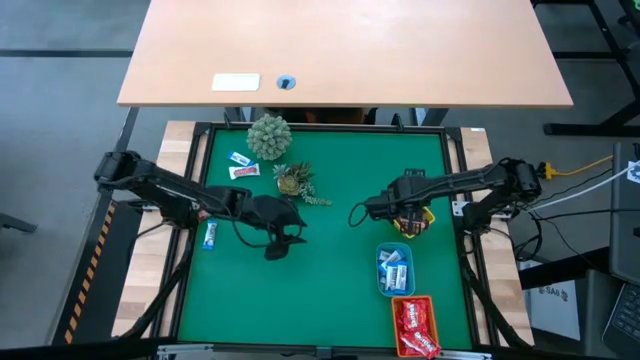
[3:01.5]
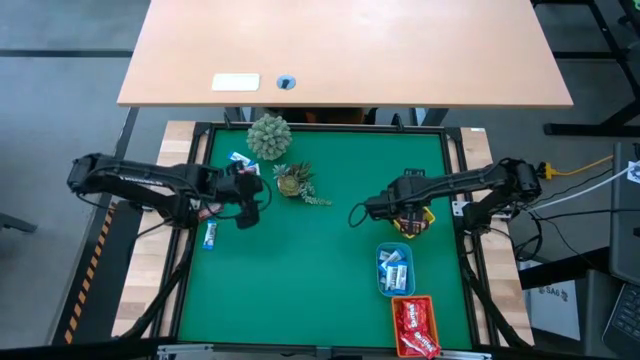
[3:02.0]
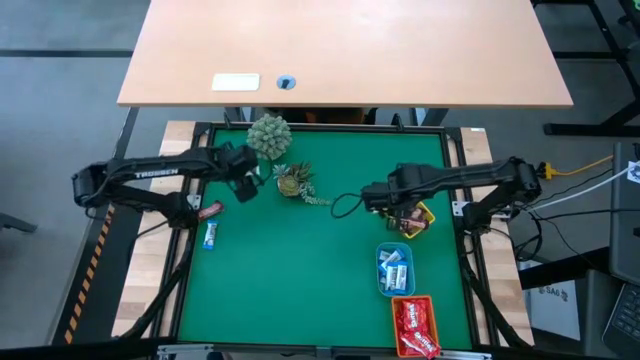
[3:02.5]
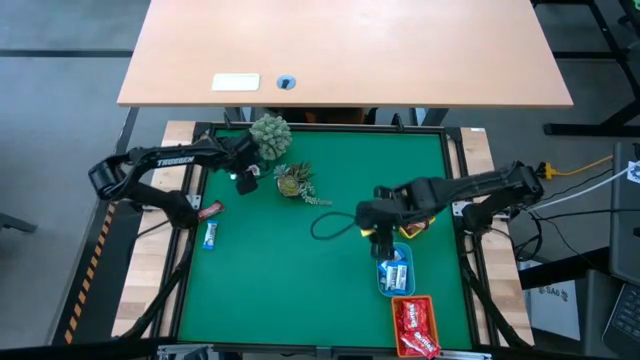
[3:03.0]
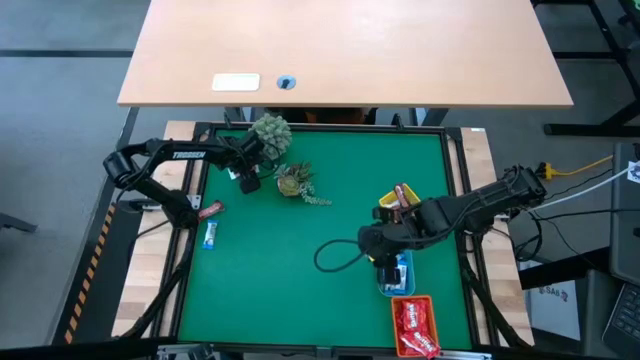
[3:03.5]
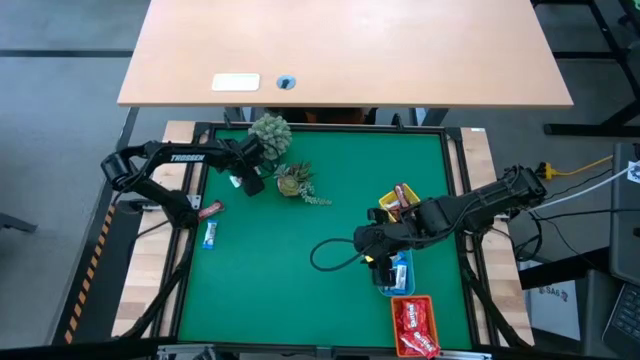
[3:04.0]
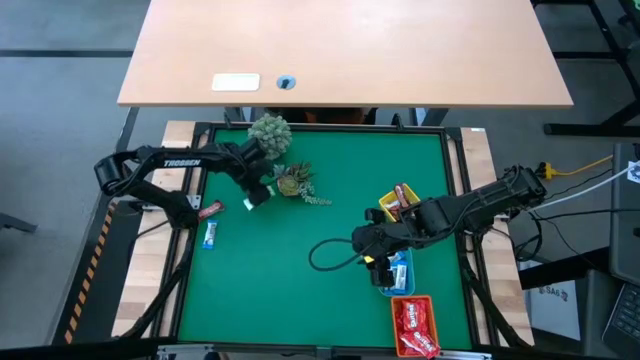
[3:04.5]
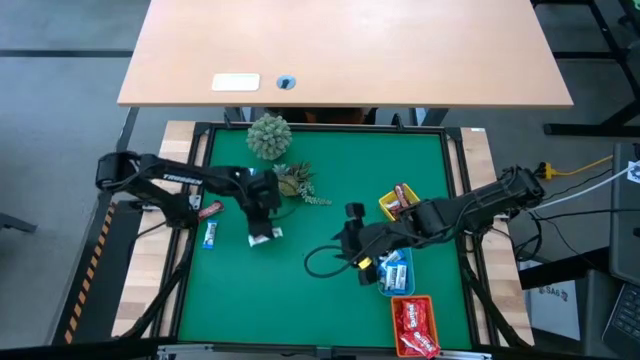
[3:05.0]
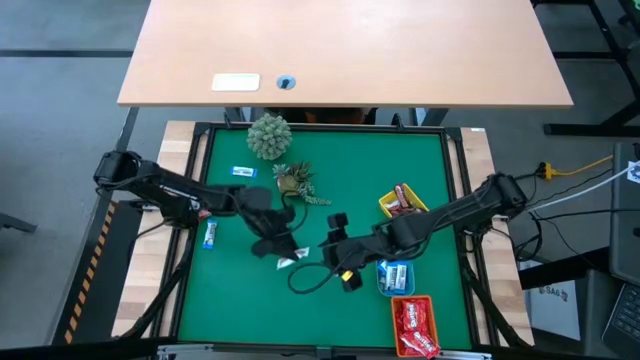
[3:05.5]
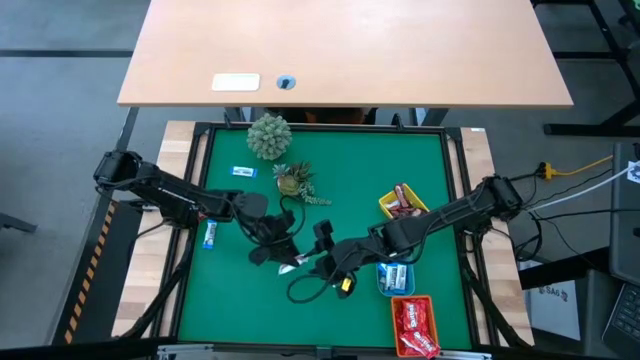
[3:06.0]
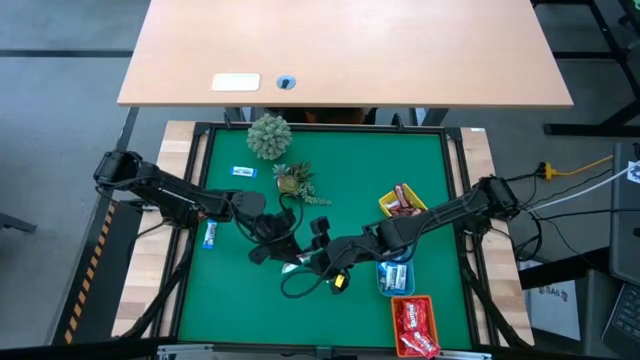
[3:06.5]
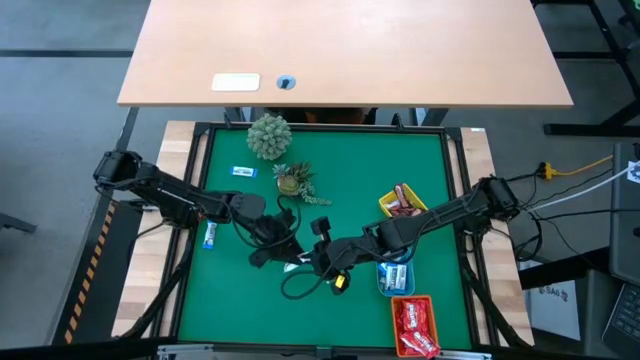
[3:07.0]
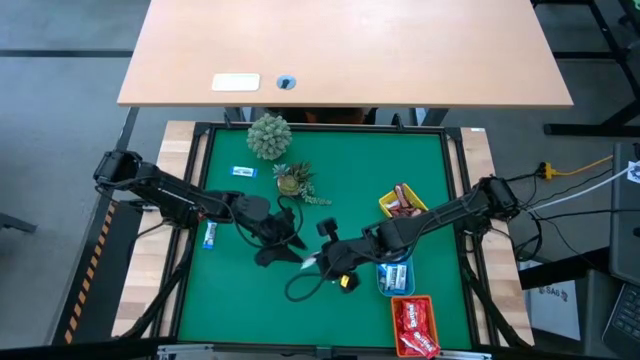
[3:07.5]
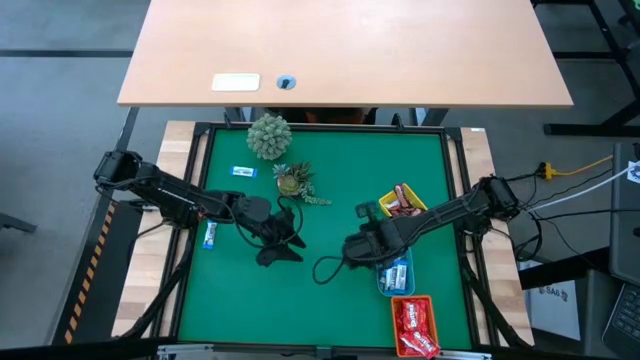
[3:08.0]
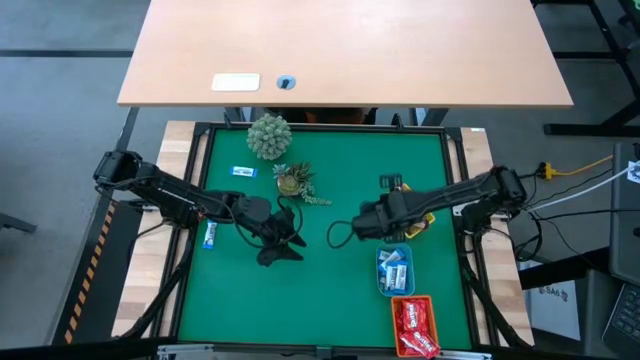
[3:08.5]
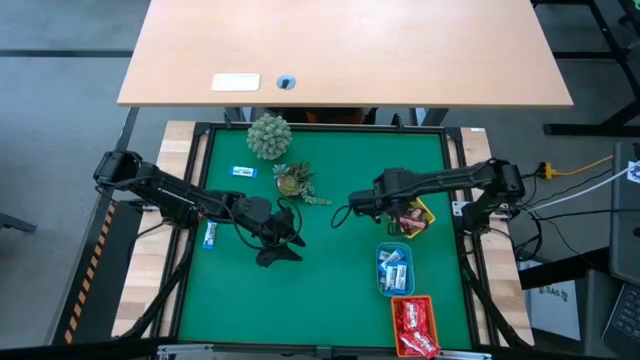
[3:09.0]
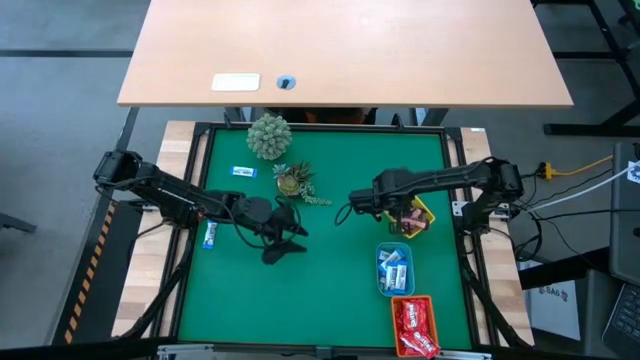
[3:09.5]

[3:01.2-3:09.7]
Task: Sort candy
Put the white candy into the yellow bin

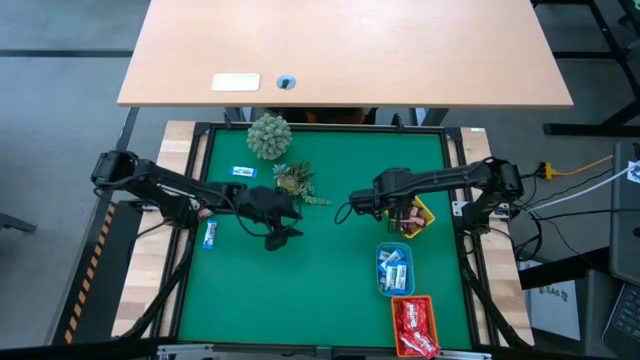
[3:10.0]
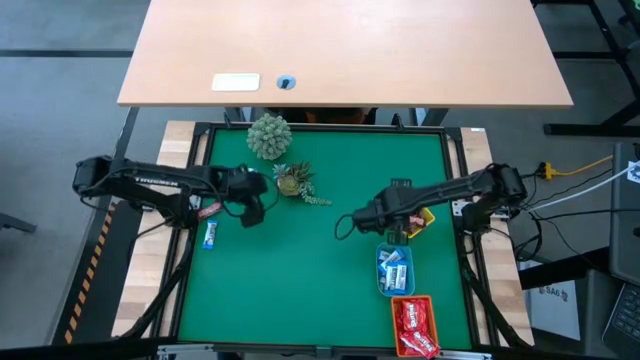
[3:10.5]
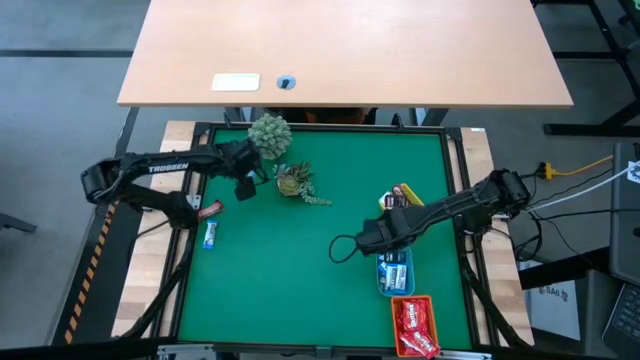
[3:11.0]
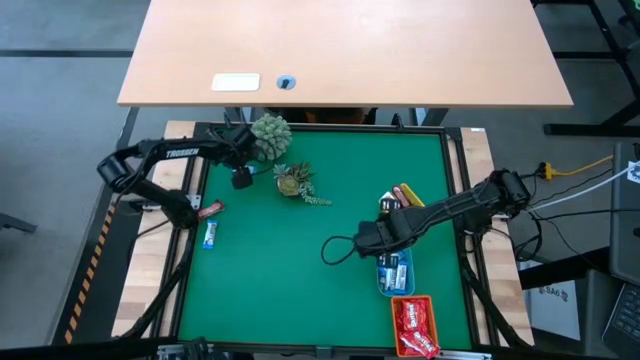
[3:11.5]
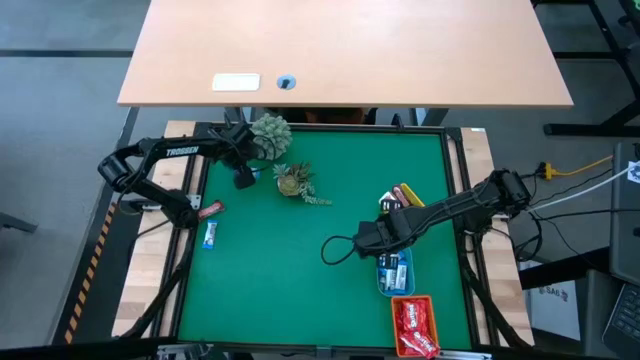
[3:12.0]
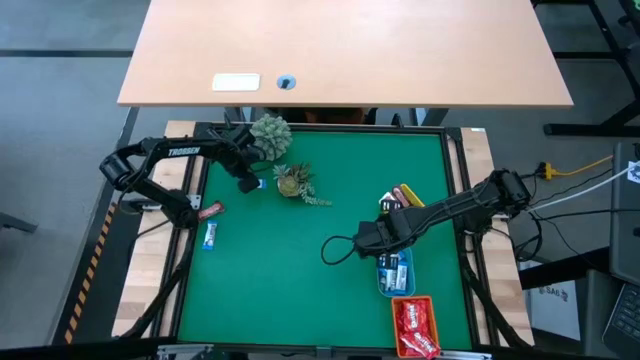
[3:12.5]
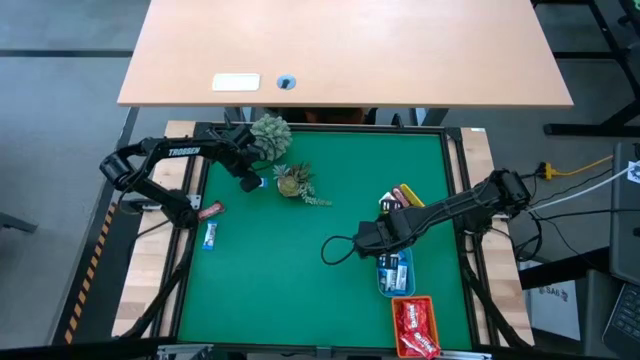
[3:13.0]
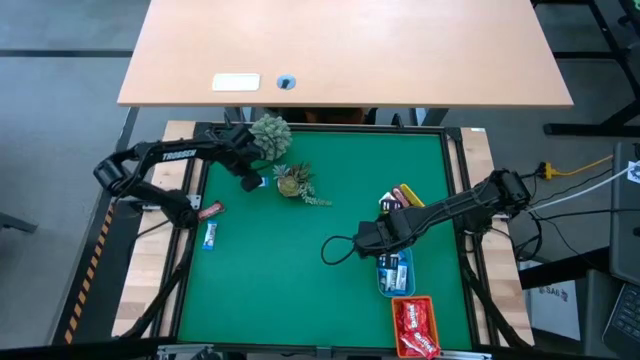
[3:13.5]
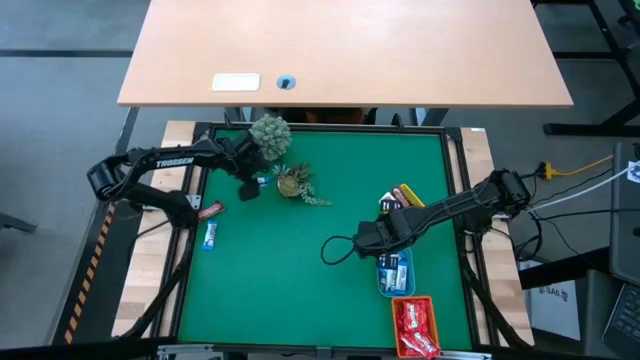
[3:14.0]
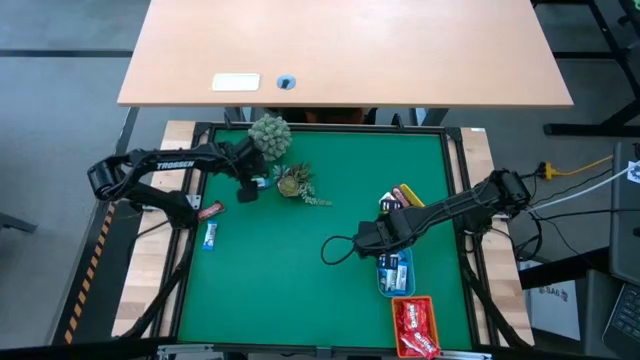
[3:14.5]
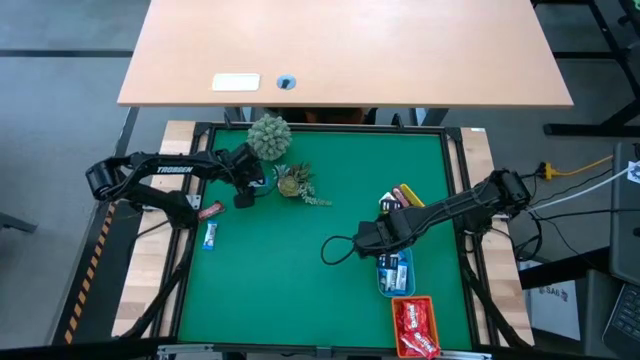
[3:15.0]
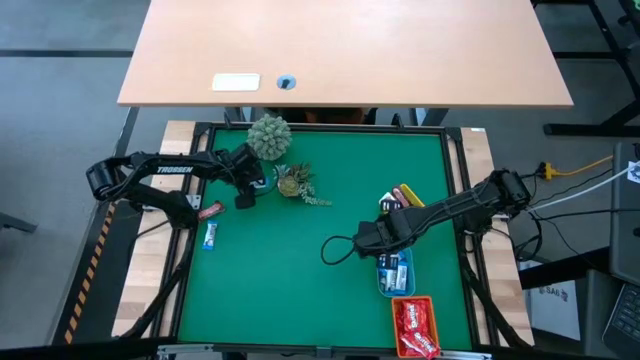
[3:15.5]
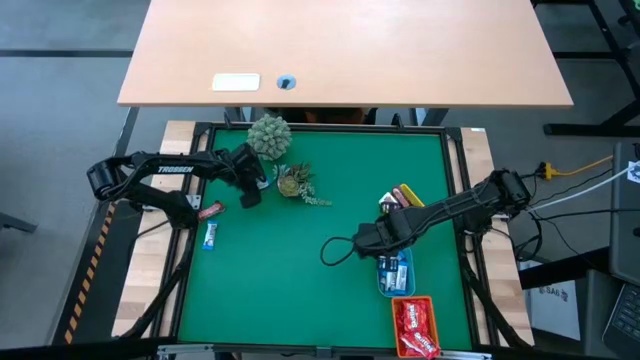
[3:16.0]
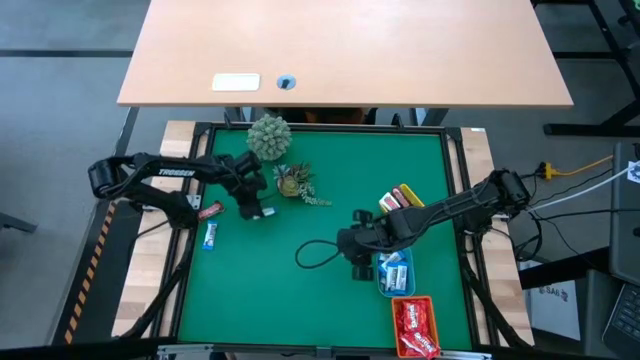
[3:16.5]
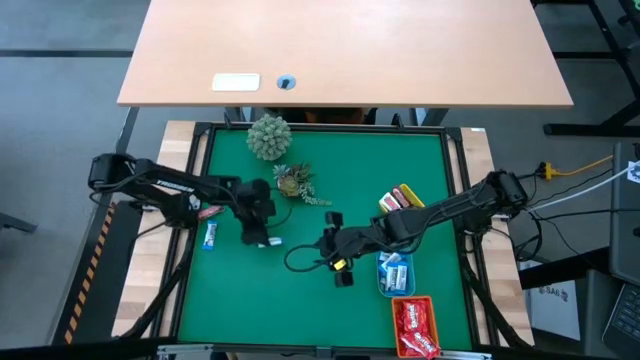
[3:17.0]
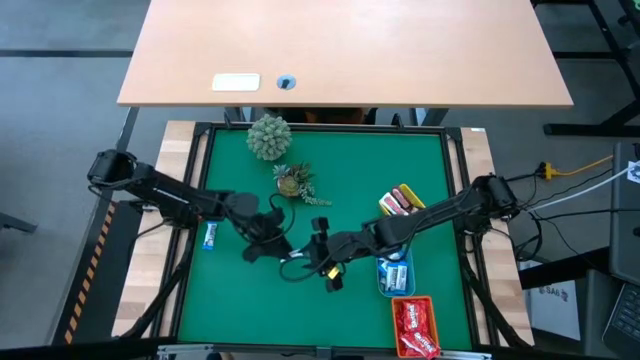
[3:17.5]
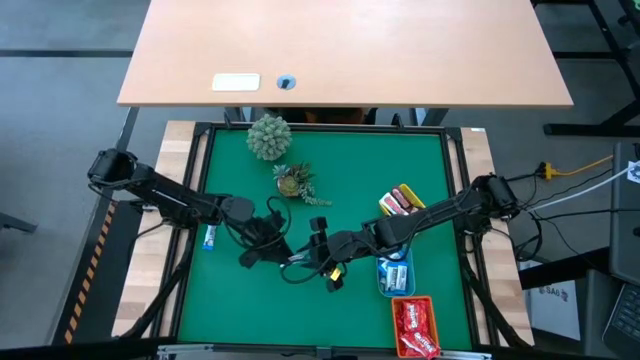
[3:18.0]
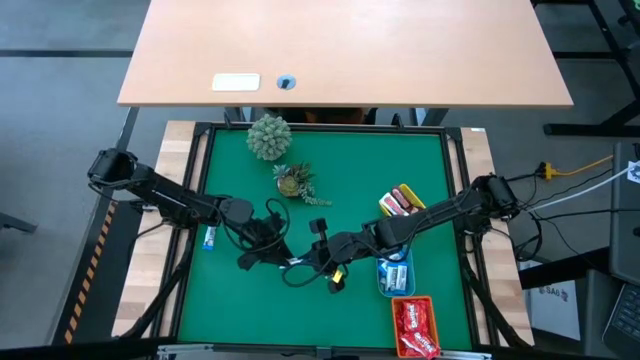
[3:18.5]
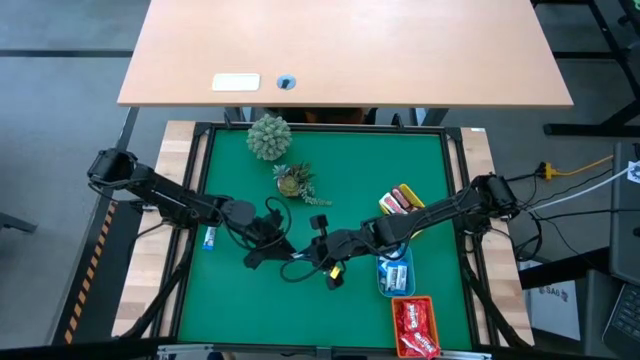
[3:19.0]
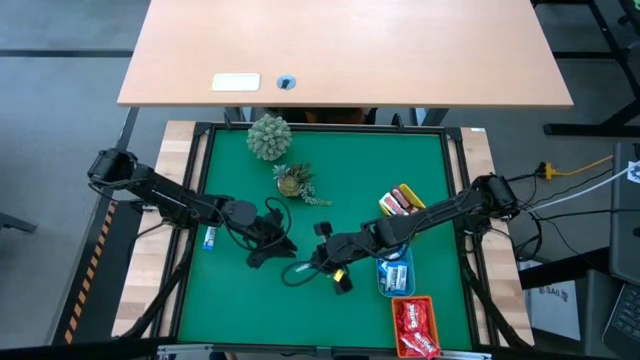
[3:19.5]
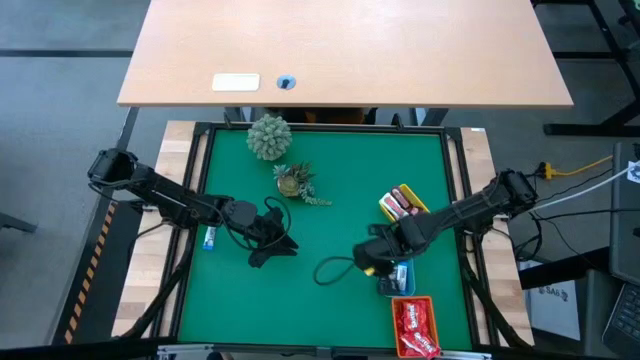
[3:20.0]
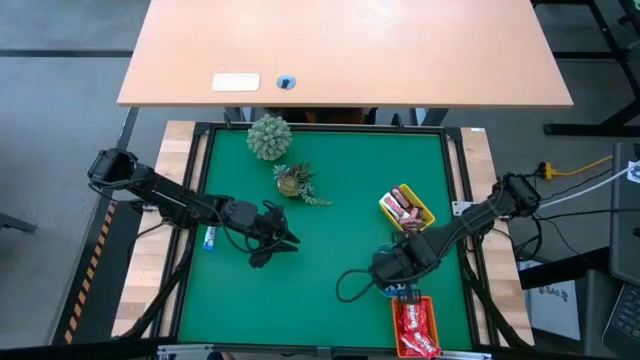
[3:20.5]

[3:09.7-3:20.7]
Put the white chocolate into the blue bin

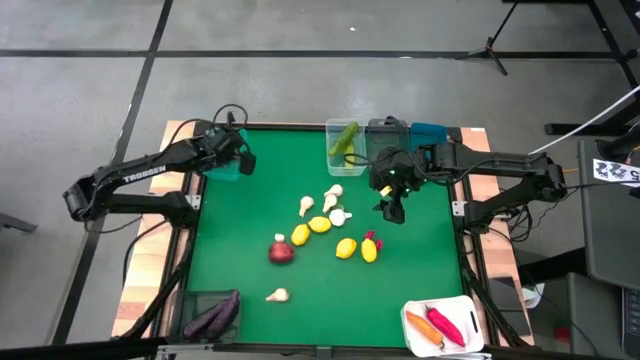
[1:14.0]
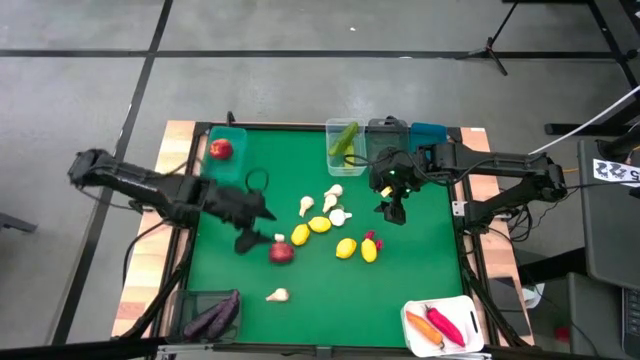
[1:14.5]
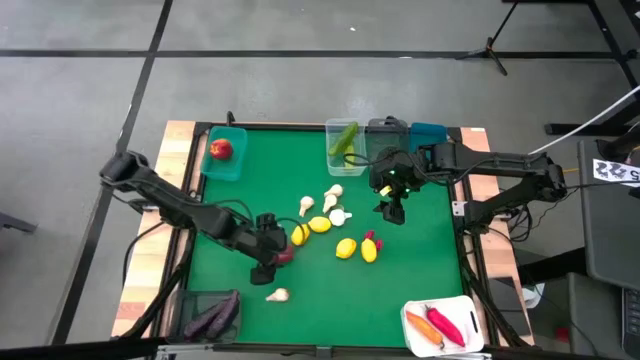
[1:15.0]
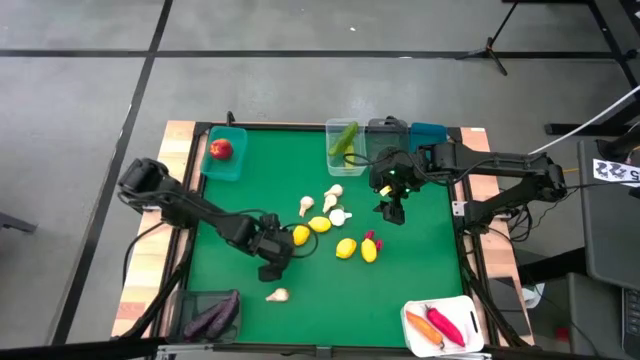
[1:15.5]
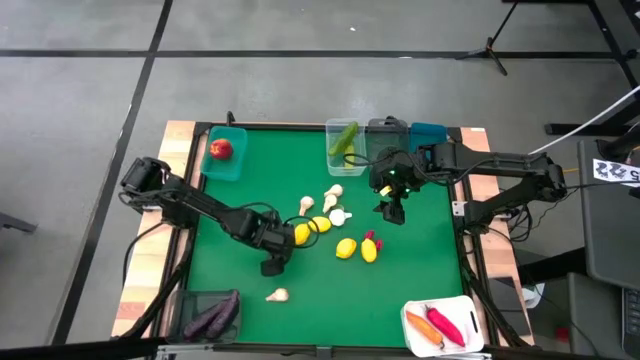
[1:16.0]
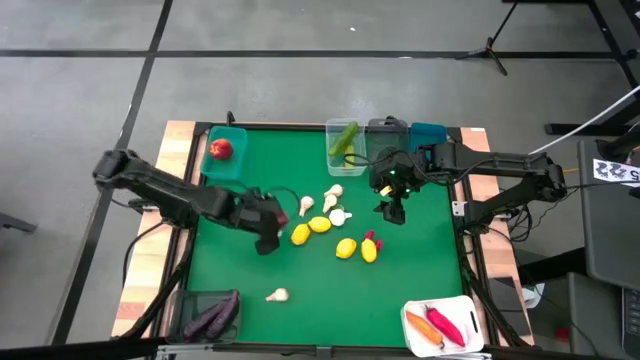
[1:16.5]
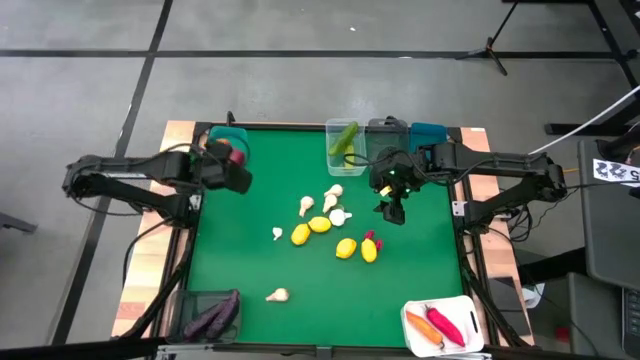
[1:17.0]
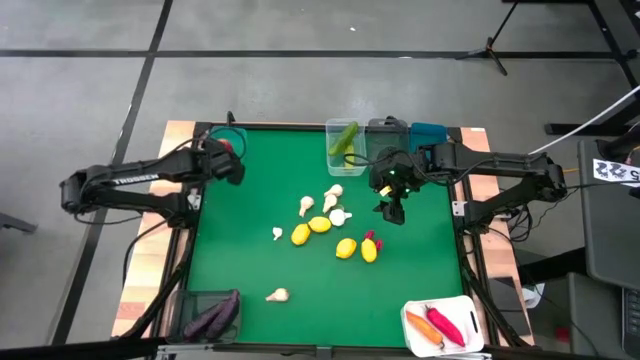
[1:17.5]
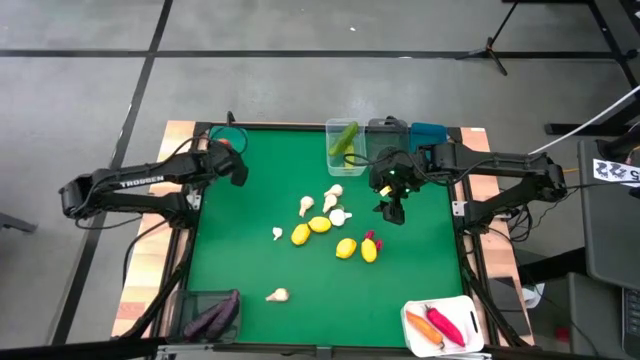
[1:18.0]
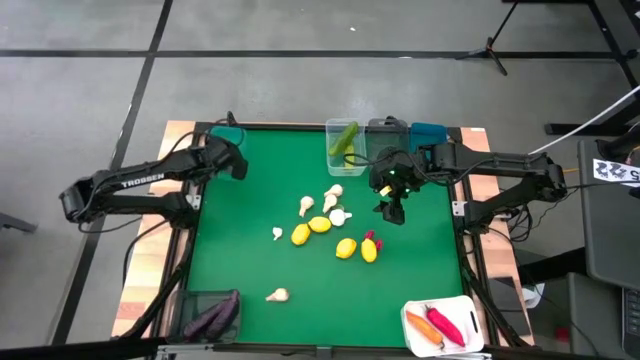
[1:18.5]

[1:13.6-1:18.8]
Task: Sort produce into baskets
Put the red apple into the green bin
